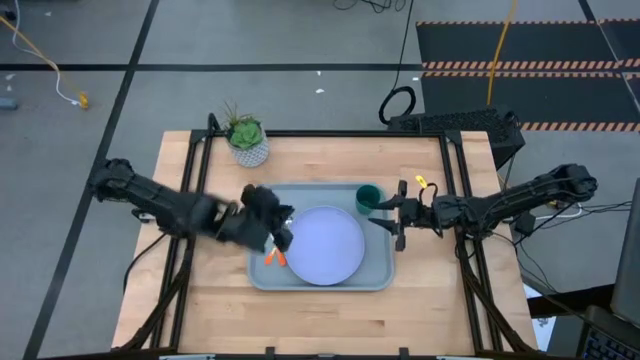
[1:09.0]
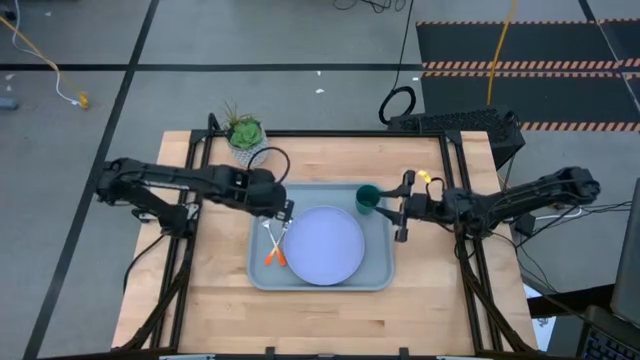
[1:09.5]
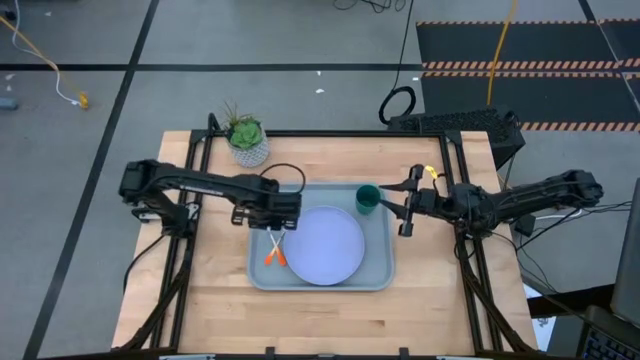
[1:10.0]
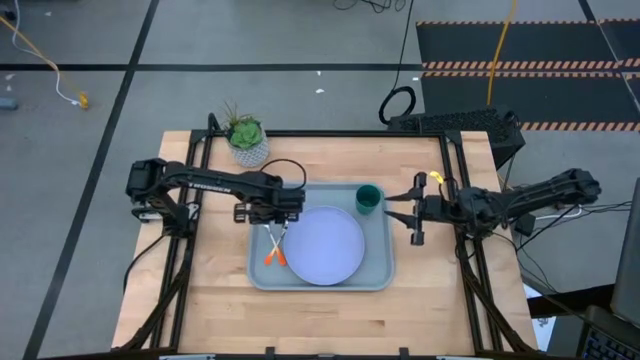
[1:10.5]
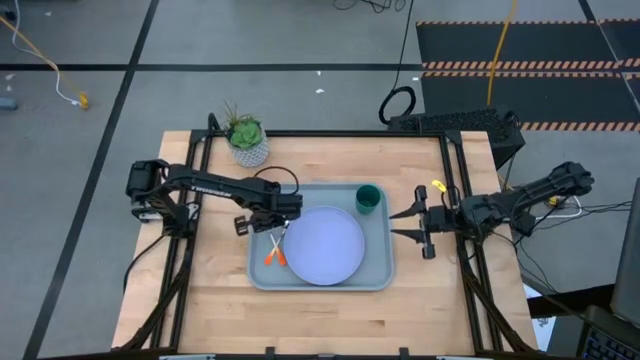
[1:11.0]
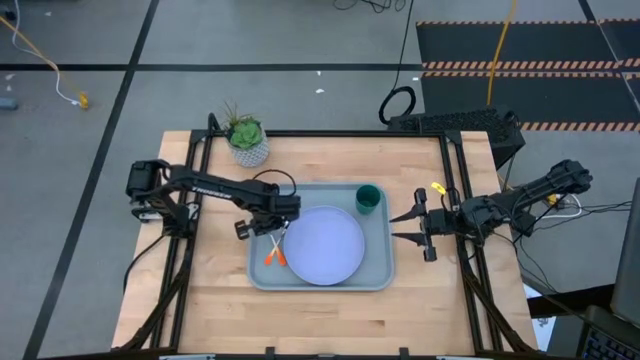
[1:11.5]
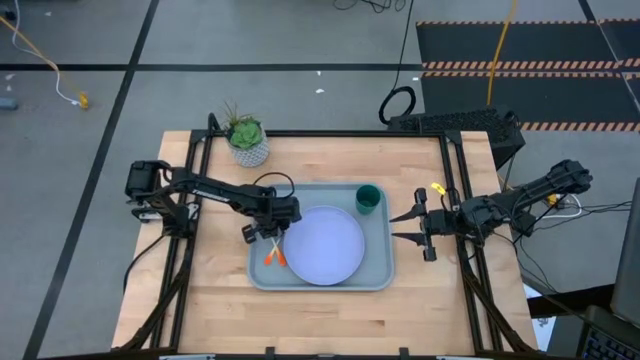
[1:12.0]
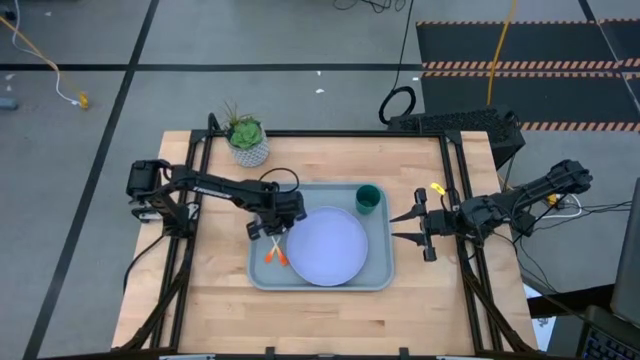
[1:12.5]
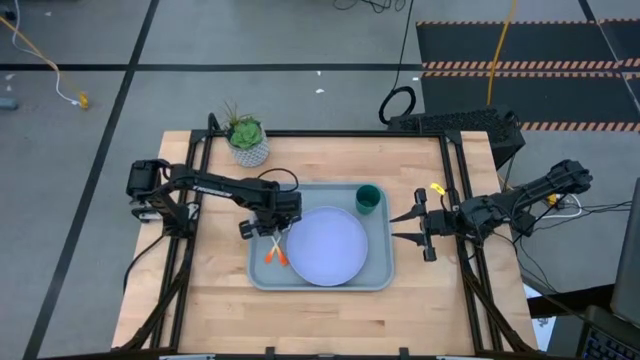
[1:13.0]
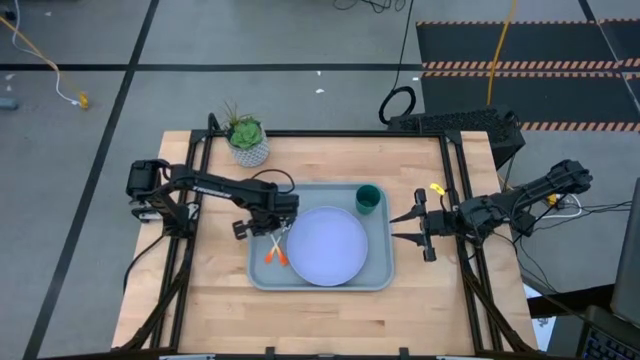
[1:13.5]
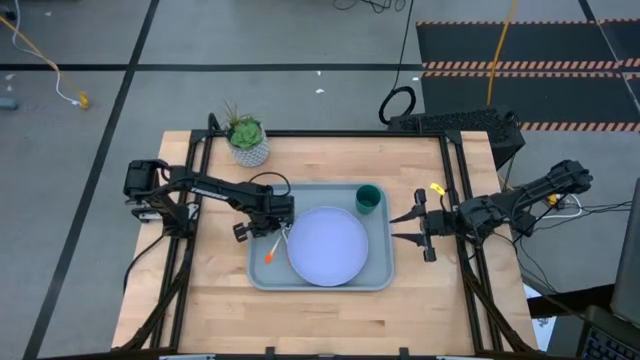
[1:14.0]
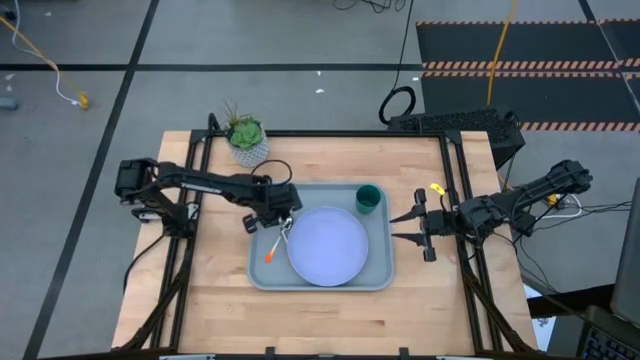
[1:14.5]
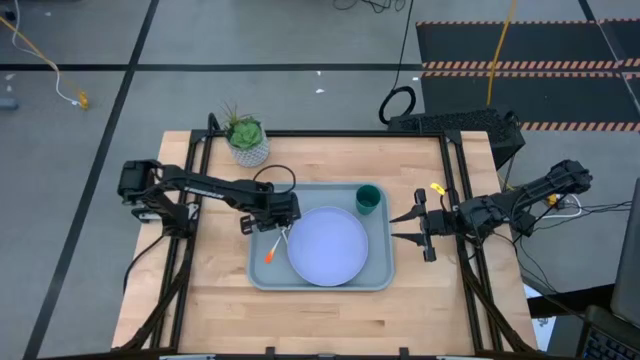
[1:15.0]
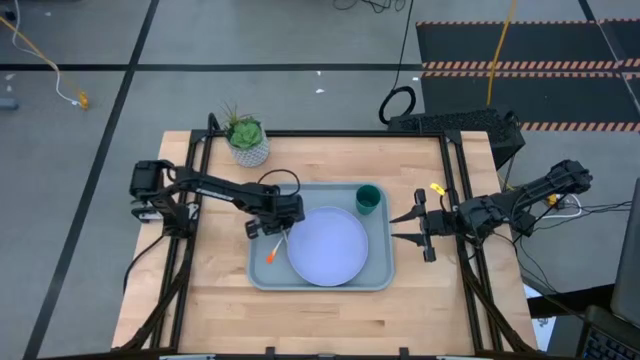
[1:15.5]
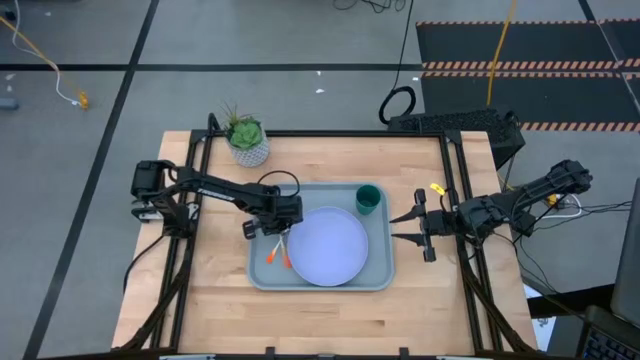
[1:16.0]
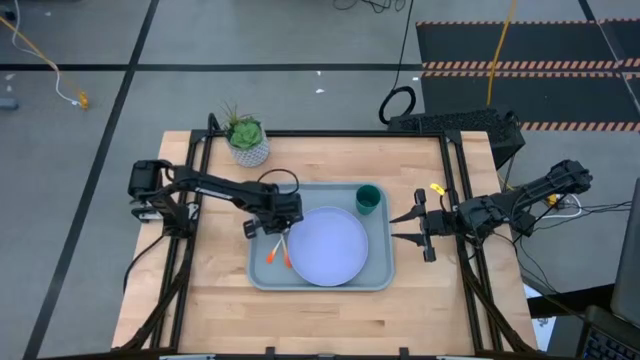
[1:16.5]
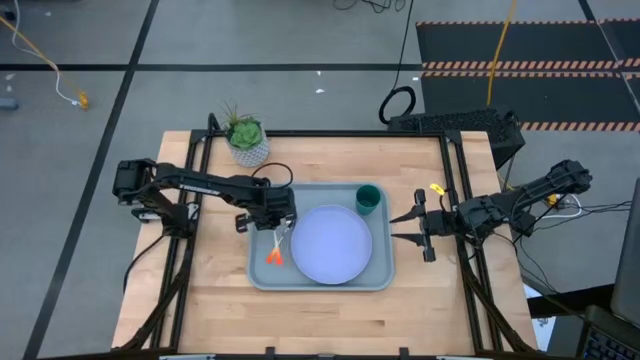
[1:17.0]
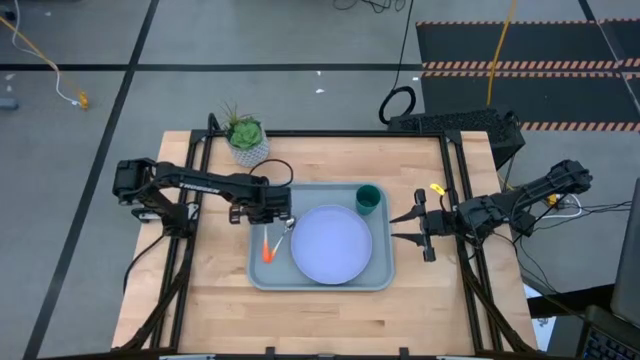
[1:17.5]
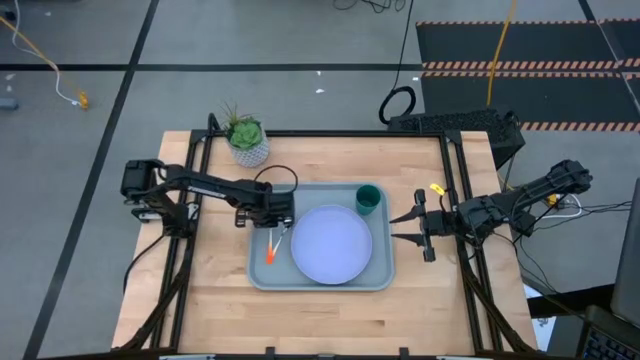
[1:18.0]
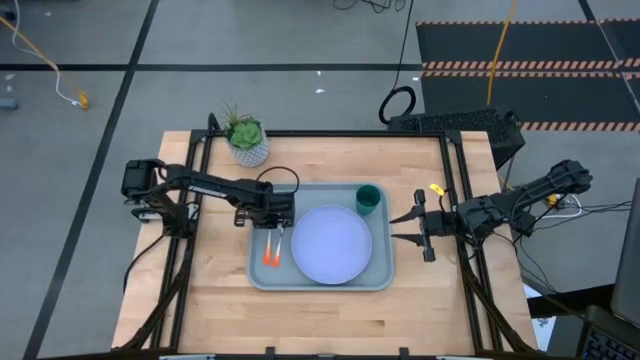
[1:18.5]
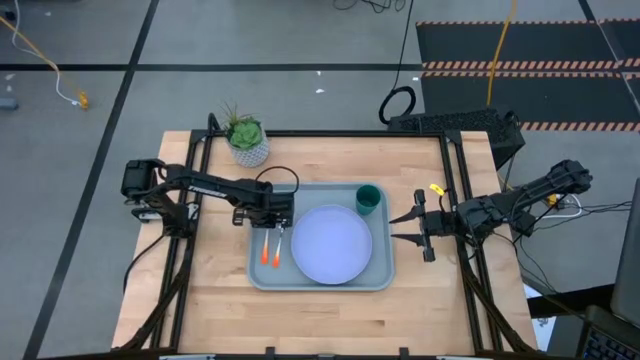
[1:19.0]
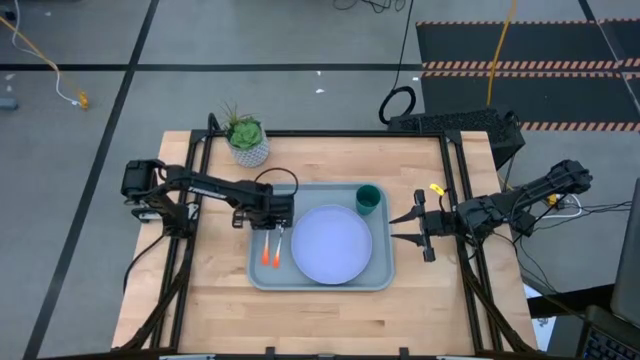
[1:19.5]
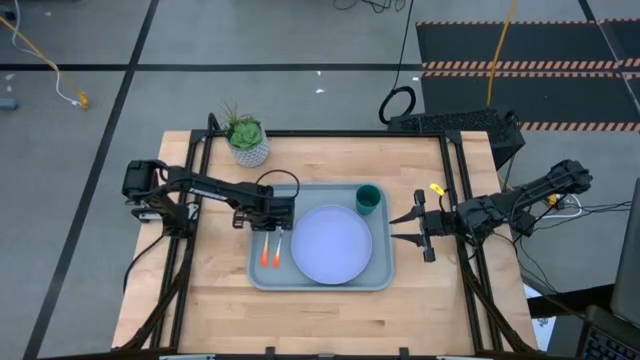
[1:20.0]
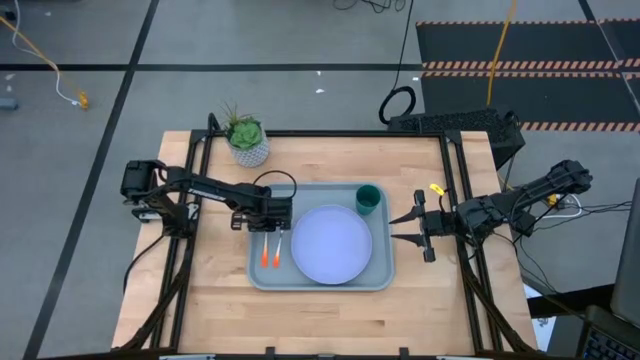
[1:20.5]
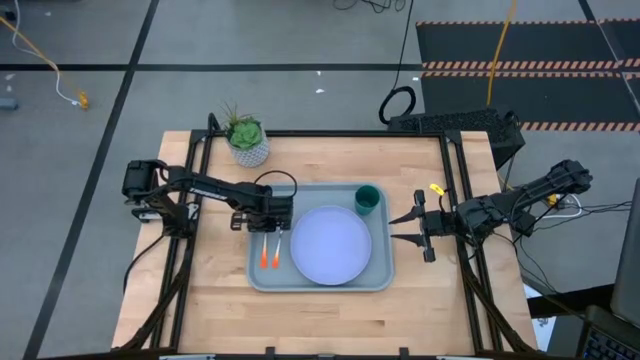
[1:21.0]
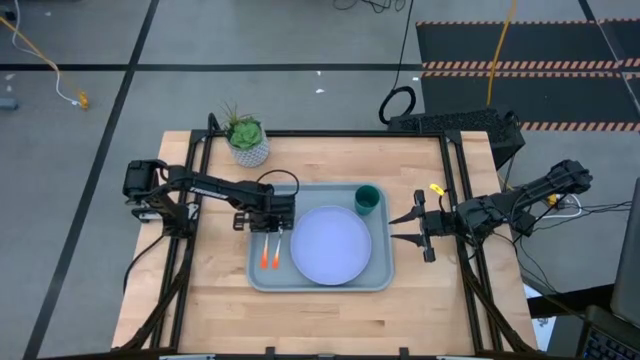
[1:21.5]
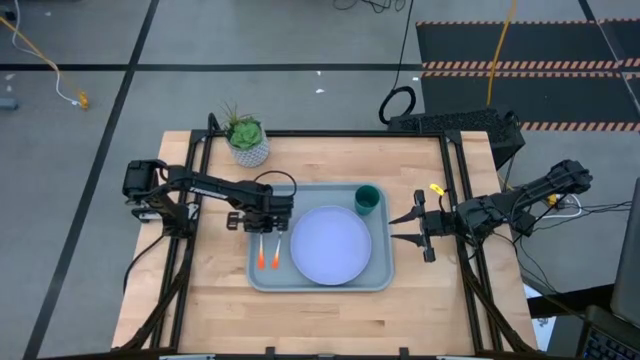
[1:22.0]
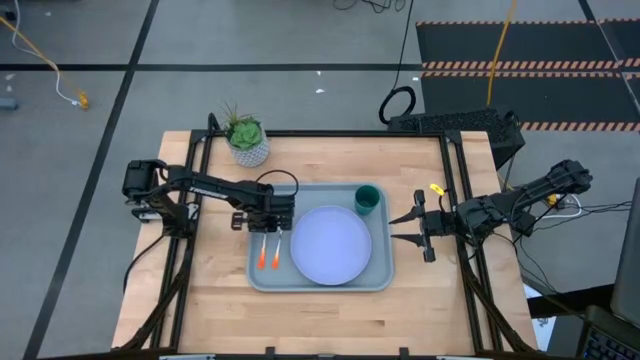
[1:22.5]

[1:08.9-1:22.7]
Task: Pick and place plate/cup/fork/spoon on tray
Put the orange fork to the left of the orange spoon on the blue tray

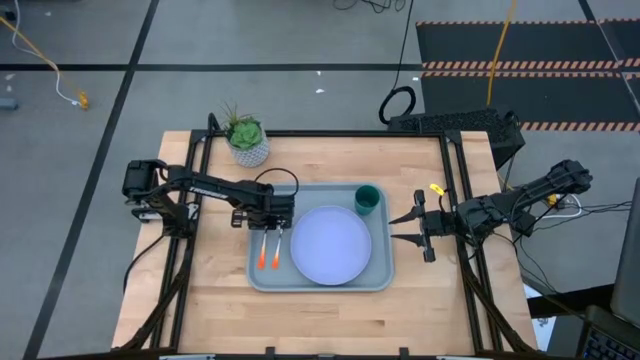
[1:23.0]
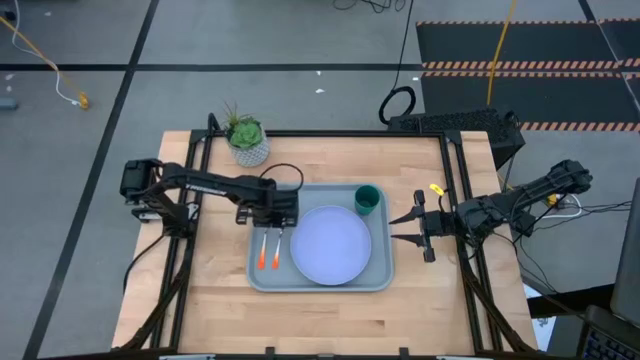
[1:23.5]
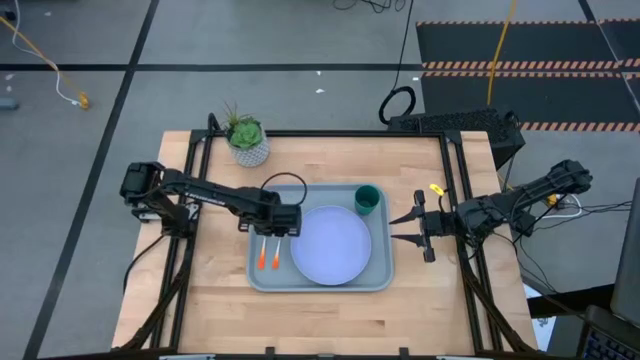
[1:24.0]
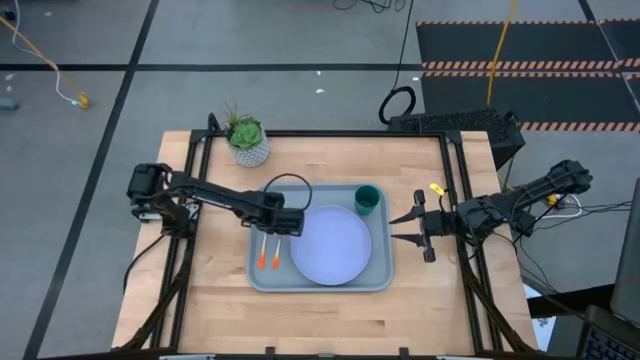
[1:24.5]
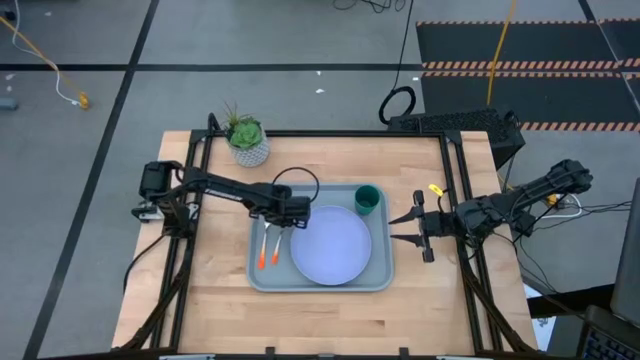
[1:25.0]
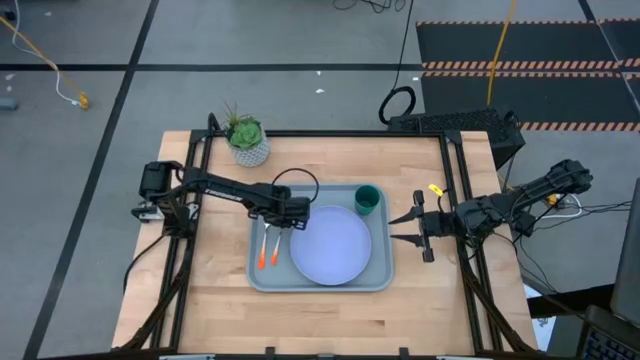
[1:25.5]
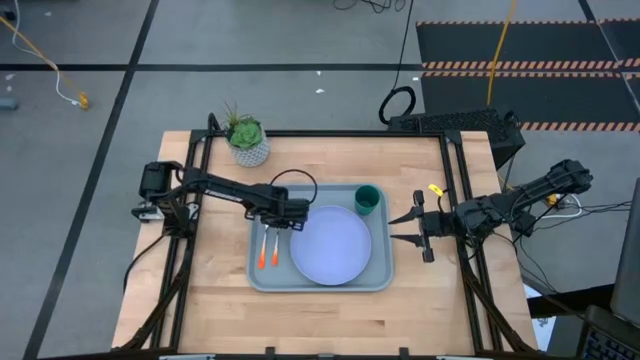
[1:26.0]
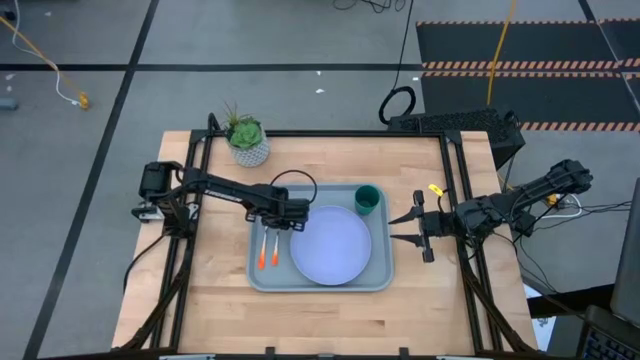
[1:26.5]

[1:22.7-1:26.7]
Adjust the orange spoon on the blue tray

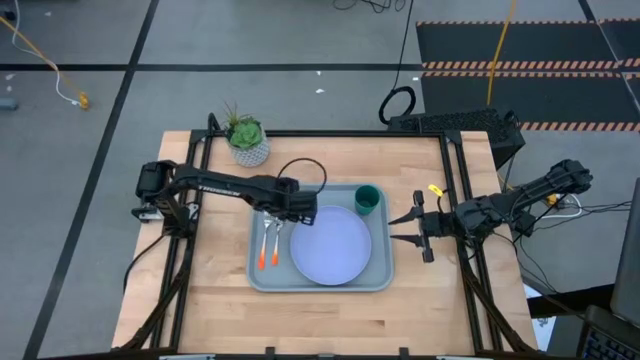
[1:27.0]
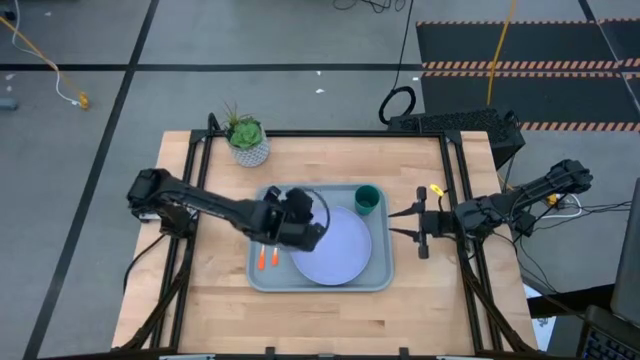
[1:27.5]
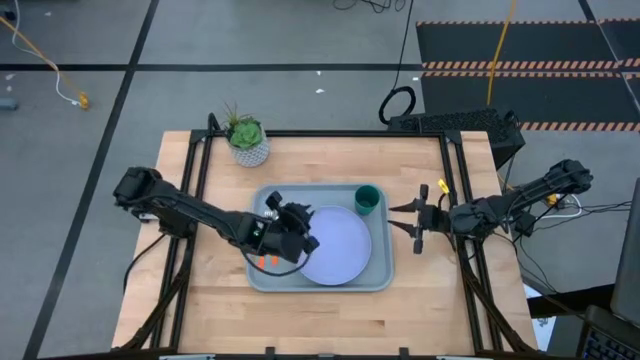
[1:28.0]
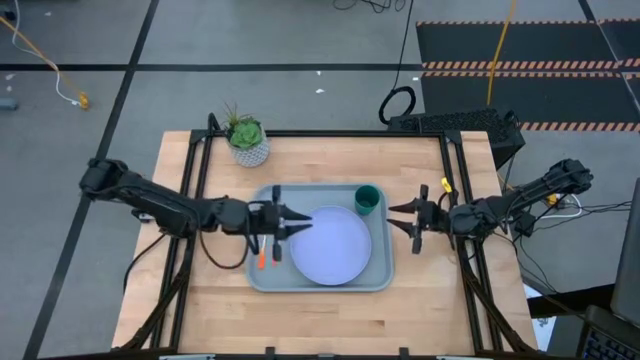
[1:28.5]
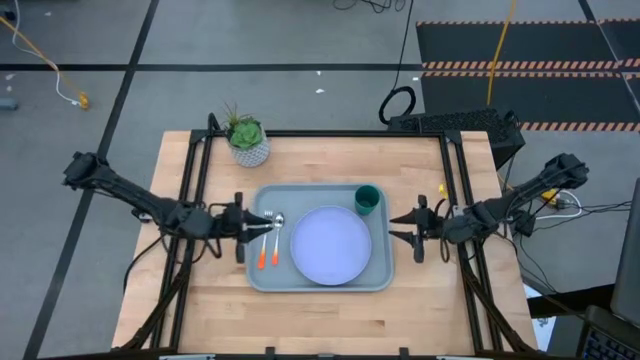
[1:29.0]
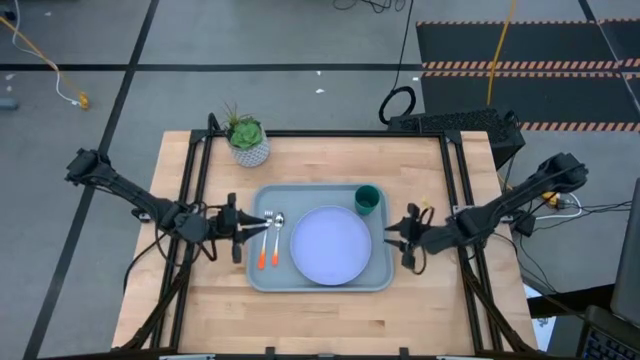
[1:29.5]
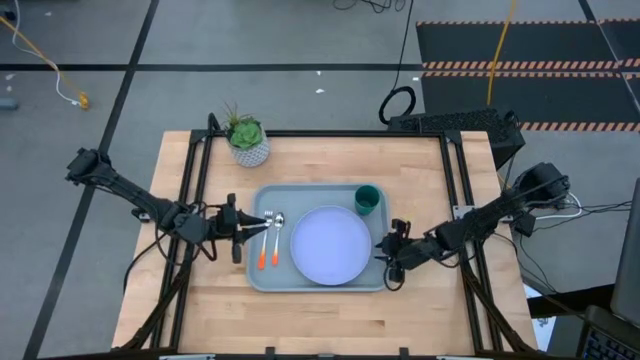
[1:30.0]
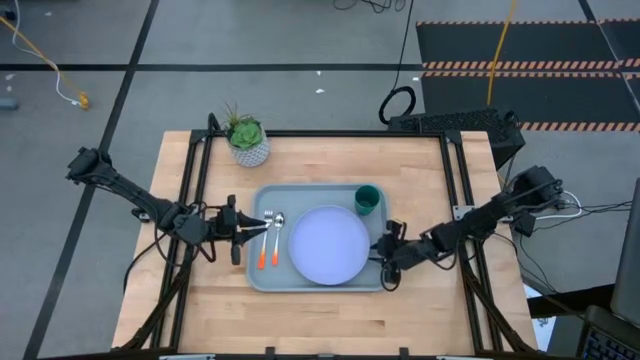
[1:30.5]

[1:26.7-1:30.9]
Adjust the blue plate on the blue tray
